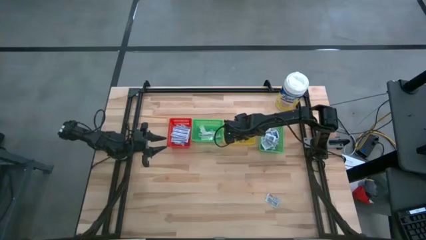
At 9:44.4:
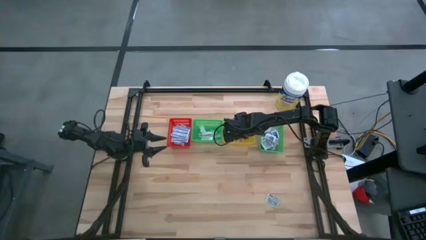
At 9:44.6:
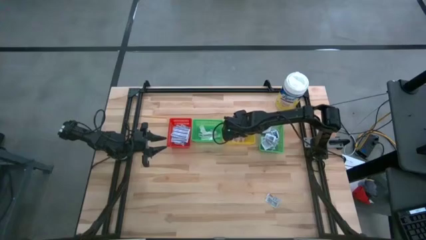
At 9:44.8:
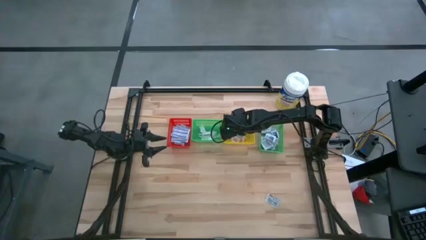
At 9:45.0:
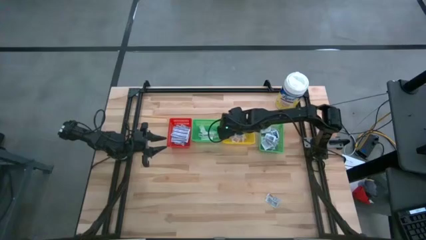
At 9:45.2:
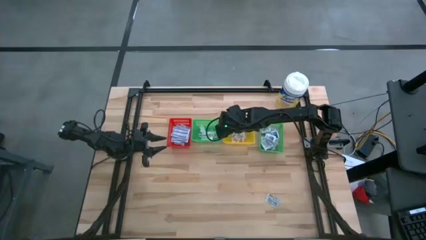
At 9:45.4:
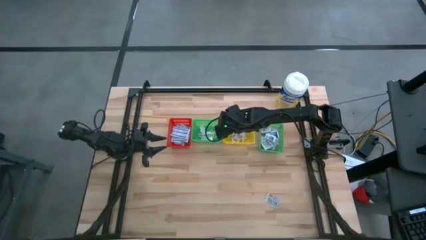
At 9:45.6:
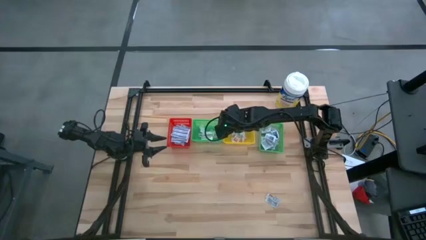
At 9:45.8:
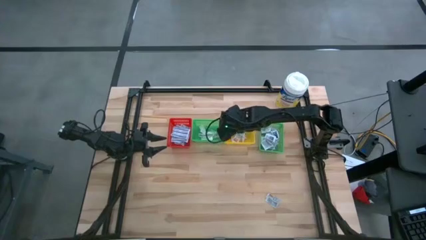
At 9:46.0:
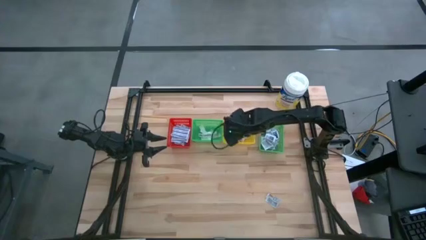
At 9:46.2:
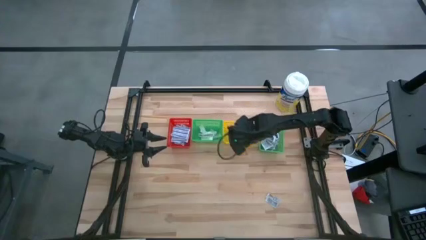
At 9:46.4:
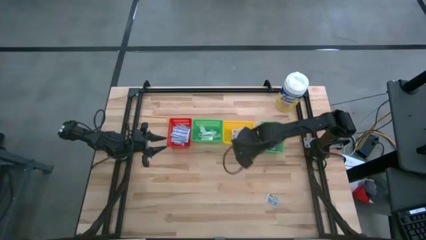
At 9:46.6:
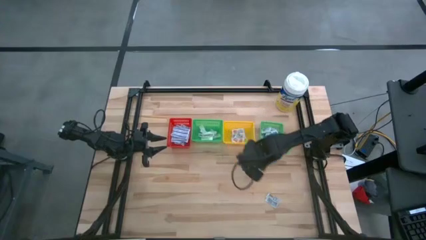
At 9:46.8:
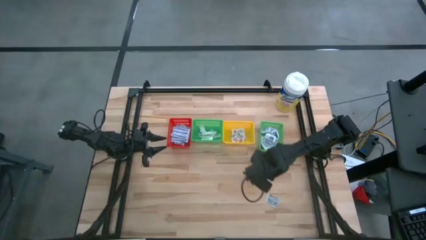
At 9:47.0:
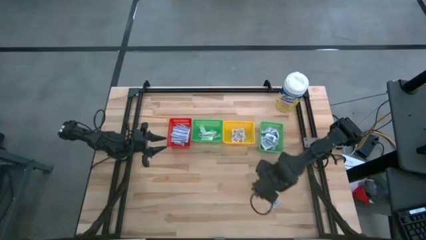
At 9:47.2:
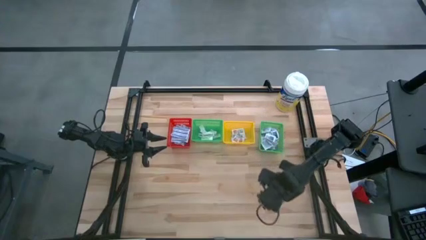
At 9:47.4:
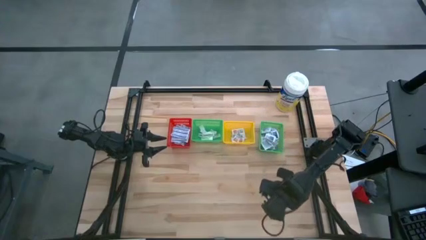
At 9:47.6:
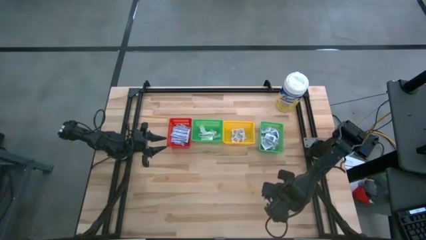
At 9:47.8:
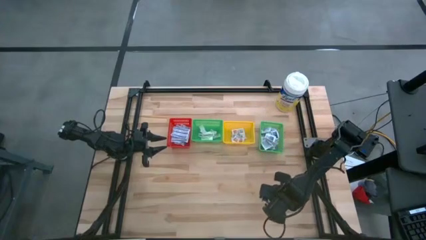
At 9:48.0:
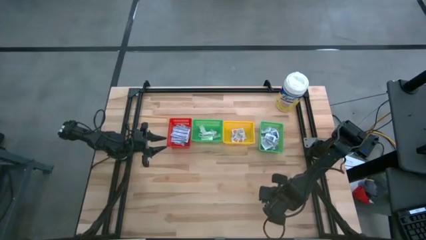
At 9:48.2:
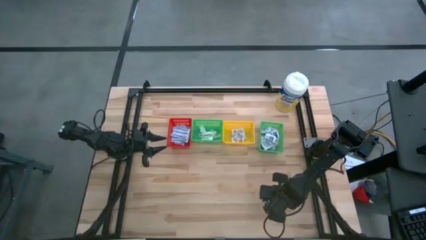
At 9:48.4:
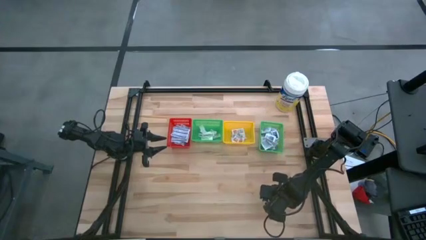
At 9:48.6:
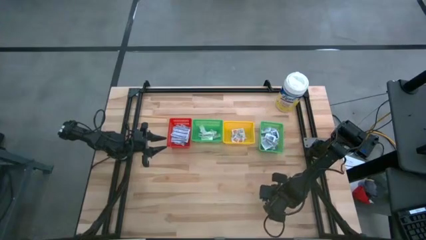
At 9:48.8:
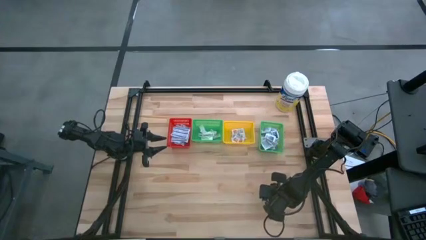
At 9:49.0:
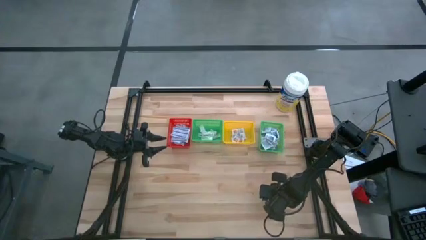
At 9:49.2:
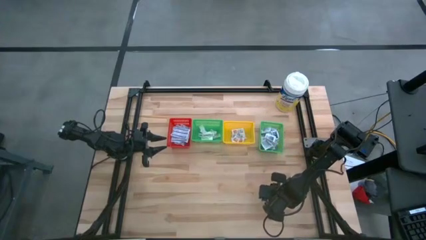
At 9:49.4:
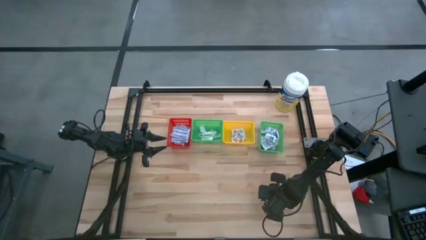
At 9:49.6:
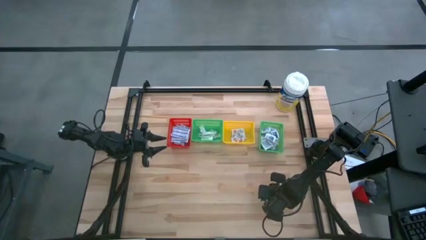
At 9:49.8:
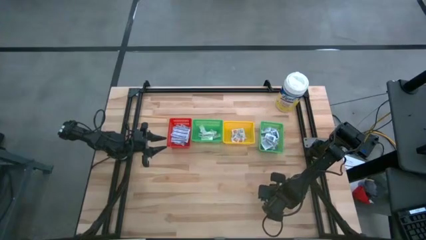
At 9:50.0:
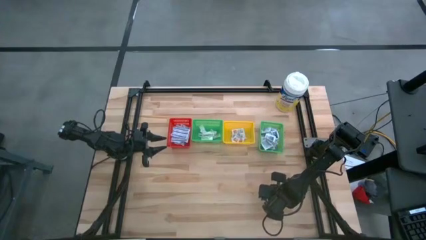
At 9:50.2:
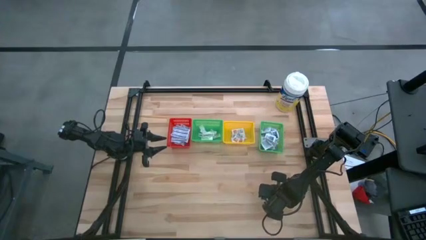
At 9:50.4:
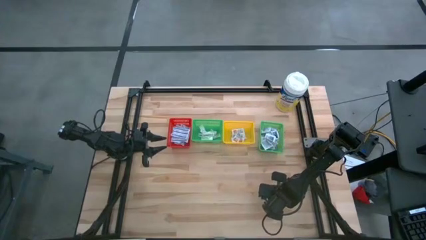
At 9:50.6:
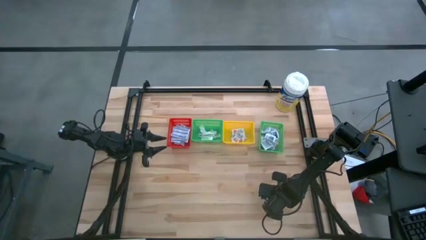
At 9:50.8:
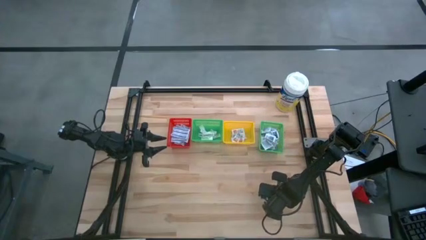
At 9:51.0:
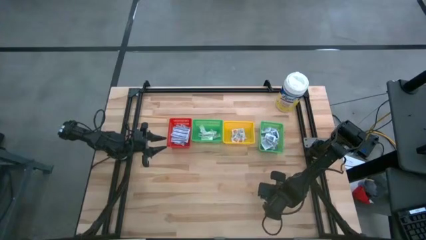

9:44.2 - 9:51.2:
Task: Pick & Place First Aid Supplies
Put the orange ointment pack into the yellow bin

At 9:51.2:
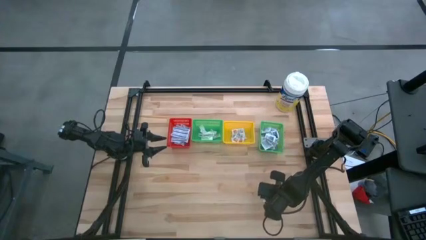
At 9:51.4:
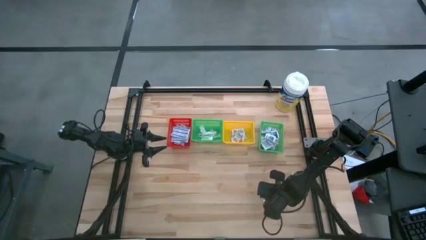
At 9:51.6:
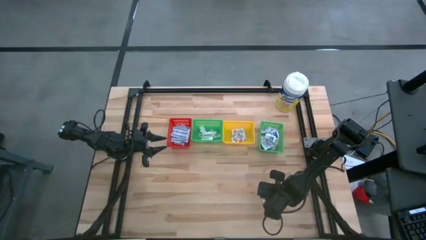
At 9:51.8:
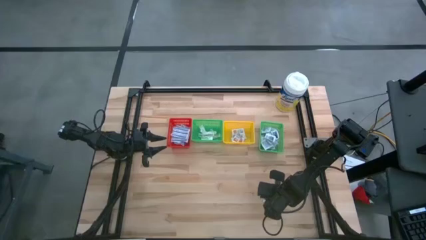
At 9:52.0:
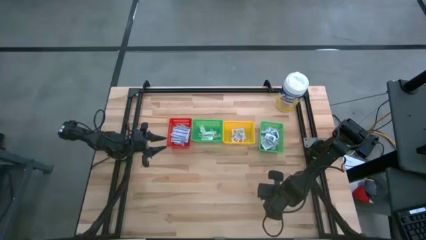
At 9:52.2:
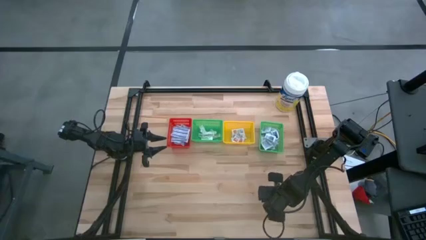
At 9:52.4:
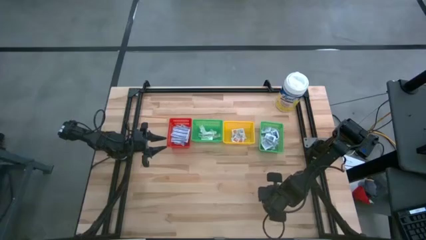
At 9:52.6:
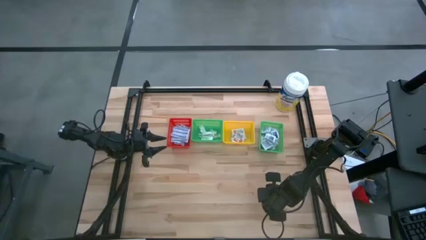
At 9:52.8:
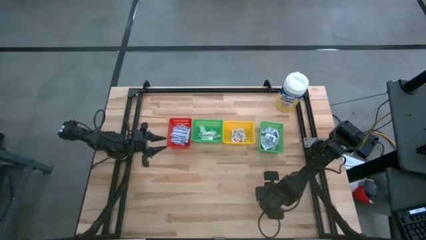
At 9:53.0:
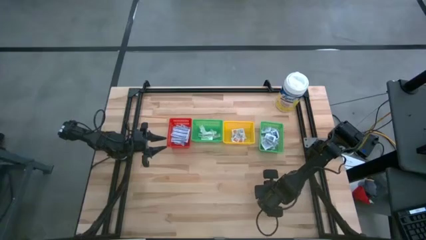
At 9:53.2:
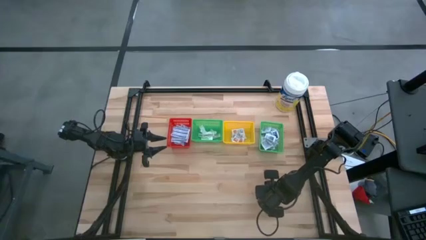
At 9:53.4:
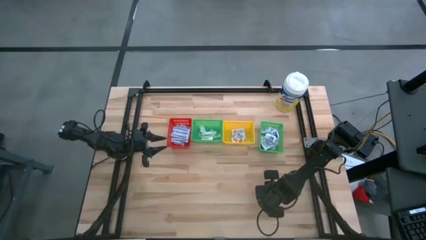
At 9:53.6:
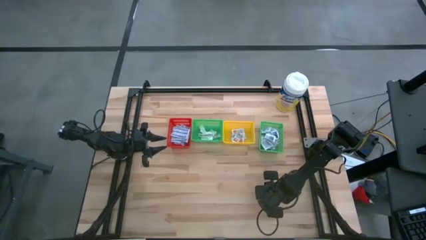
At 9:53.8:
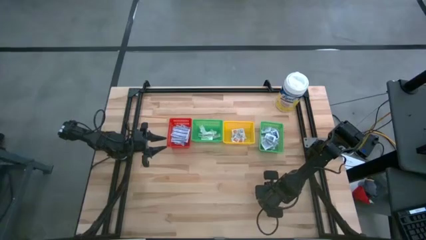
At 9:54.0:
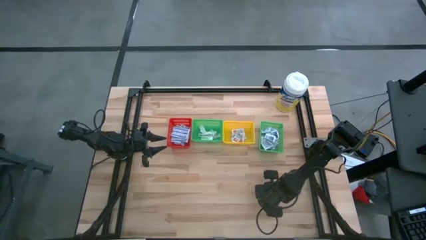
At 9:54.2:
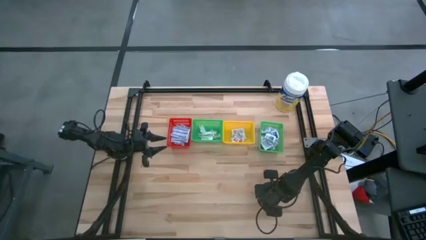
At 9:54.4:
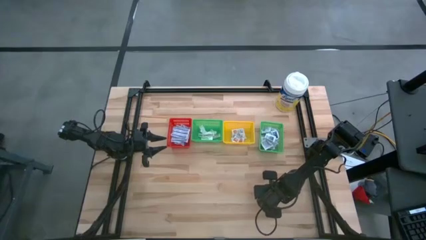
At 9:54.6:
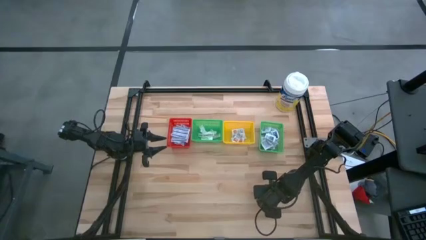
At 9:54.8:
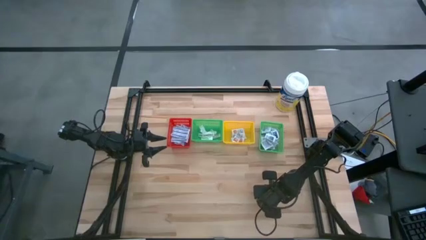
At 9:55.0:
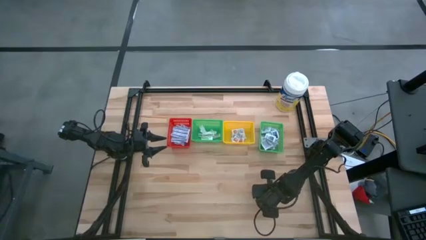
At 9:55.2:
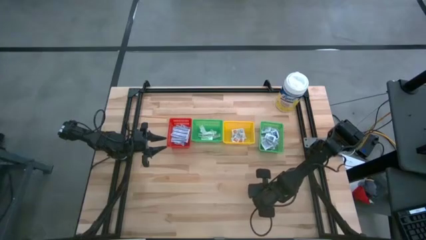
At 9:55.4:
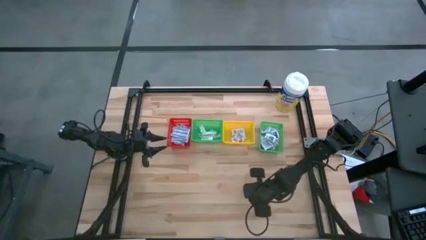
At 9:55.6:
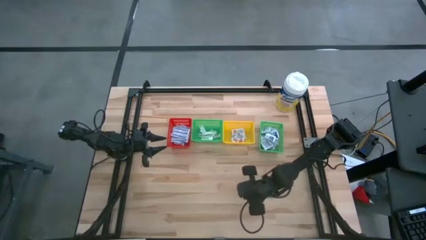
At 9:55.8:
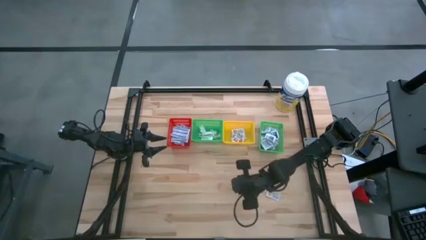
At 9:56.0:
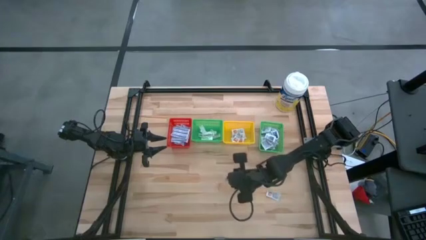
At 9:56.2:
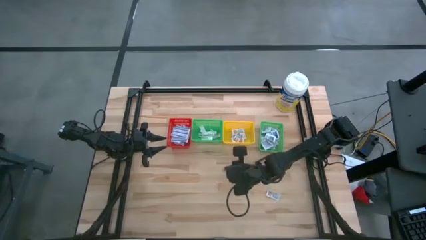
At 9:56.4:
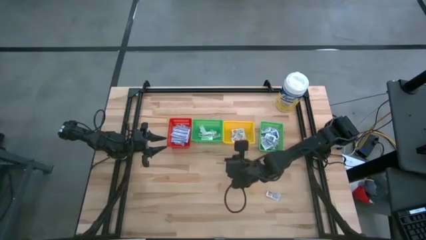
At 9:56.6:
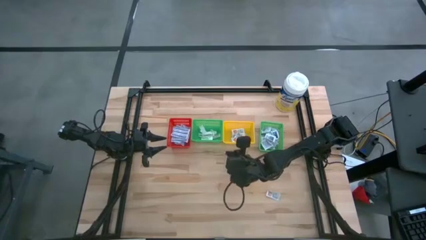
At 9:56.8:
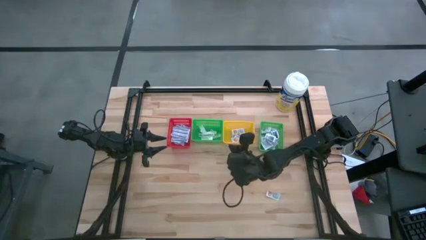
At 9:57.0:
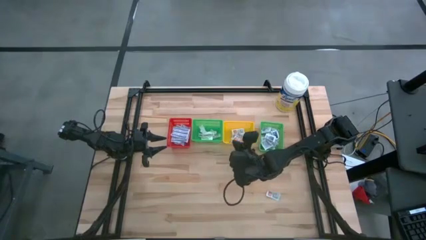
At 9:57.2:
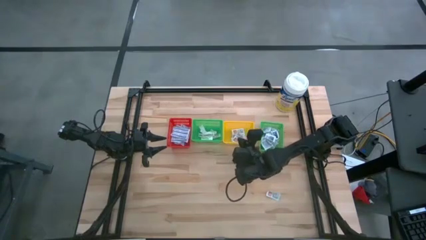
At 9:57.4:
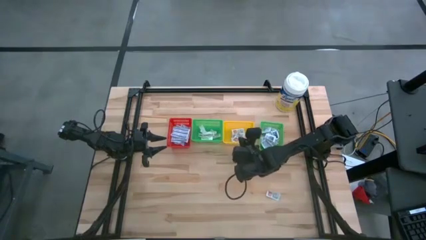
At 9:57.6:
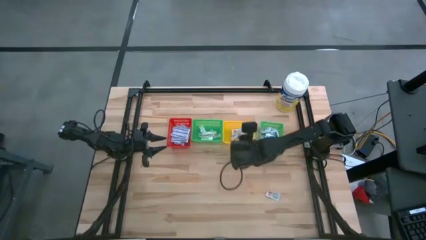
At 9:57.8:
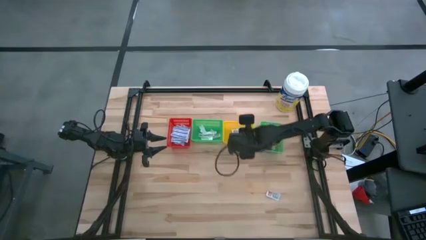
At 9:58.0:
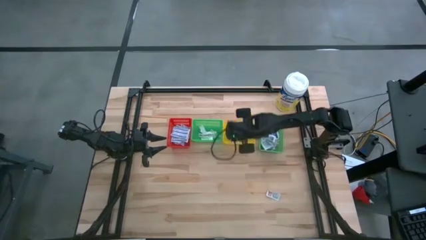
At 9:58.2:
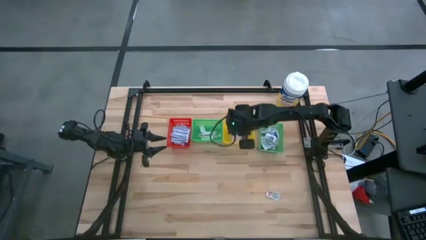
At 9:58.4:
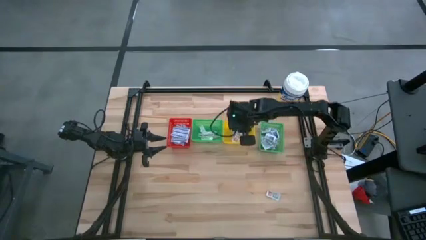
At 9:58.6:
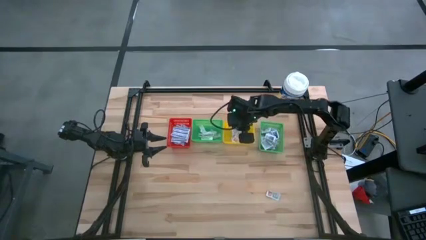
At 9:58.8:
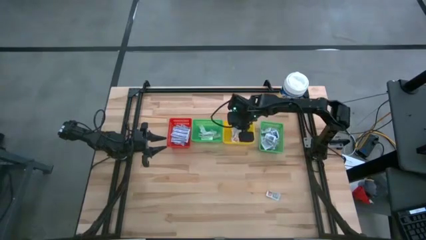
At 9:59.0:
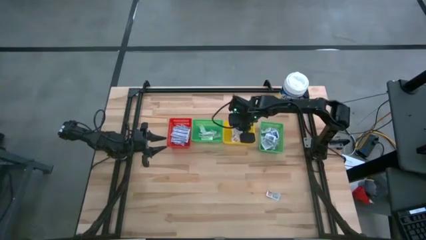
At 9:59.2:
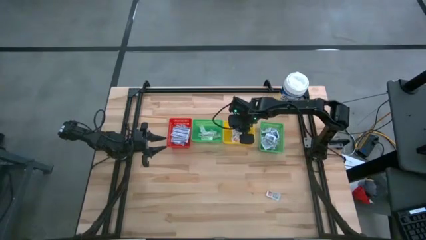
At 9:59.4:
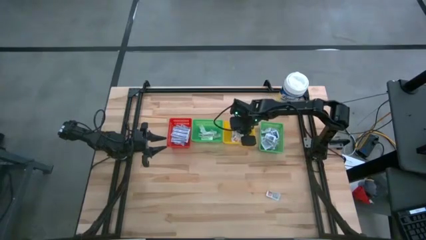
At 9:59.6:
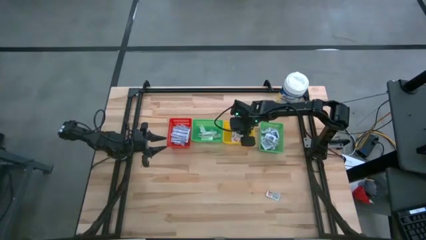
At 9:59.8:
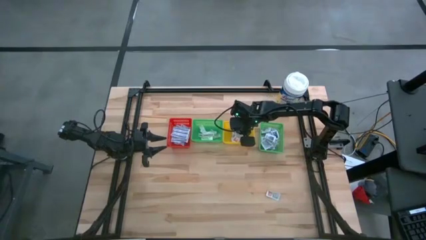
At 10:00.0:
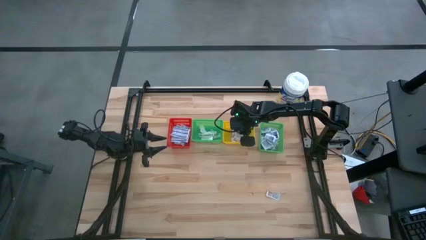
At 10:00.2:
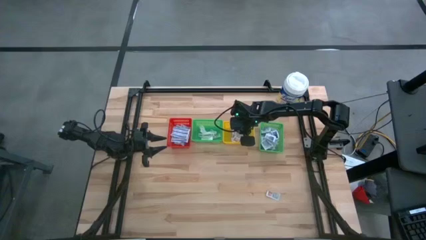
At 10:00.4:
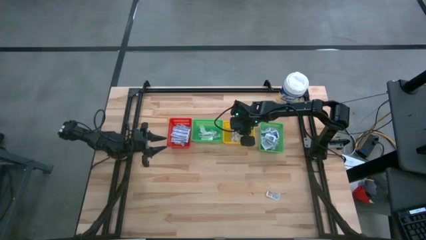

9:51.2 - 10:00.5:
Put the orange ointment pack into the yellow bin
